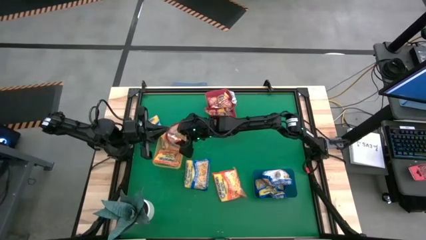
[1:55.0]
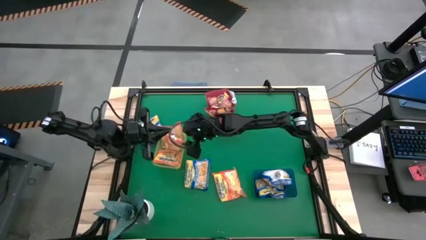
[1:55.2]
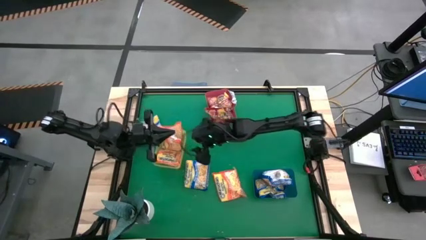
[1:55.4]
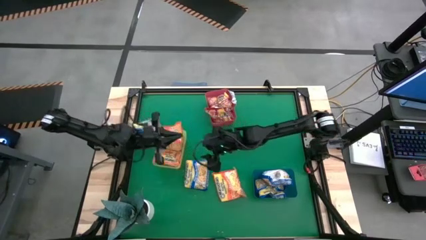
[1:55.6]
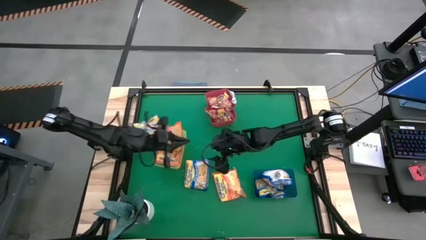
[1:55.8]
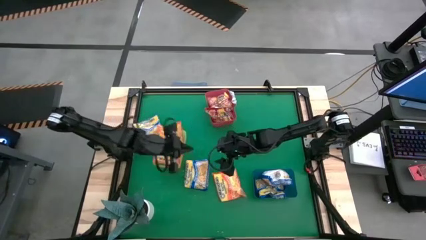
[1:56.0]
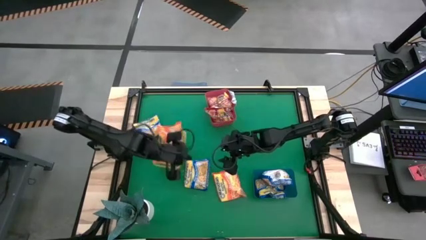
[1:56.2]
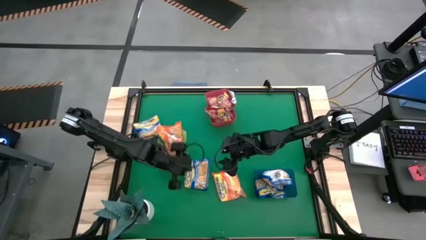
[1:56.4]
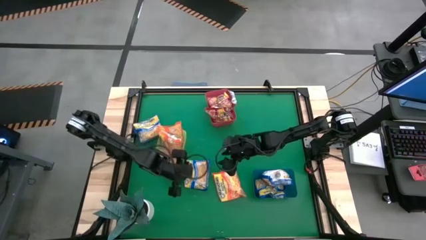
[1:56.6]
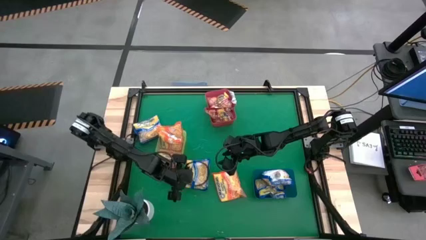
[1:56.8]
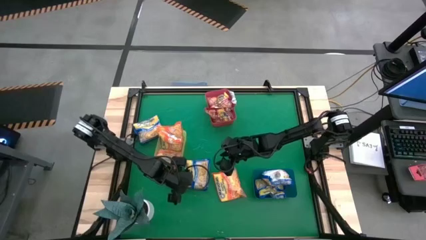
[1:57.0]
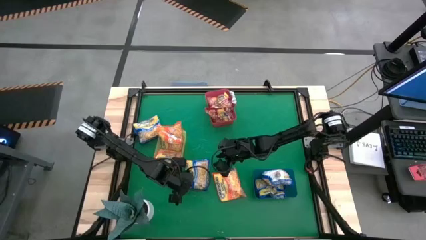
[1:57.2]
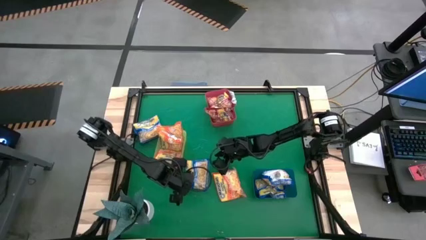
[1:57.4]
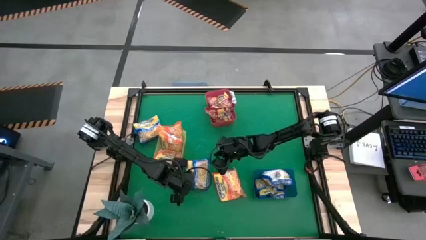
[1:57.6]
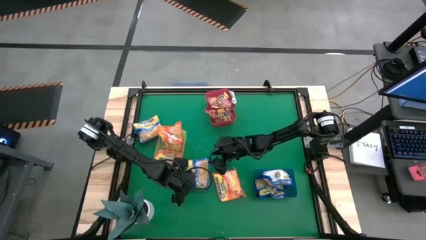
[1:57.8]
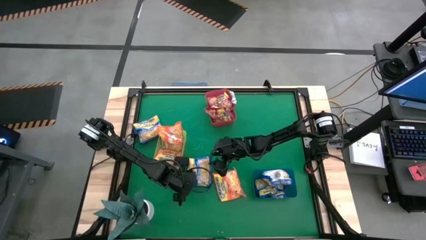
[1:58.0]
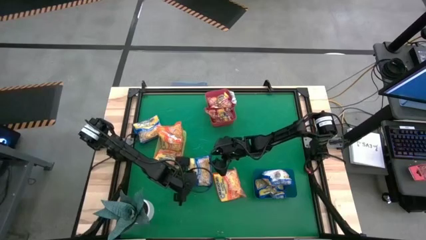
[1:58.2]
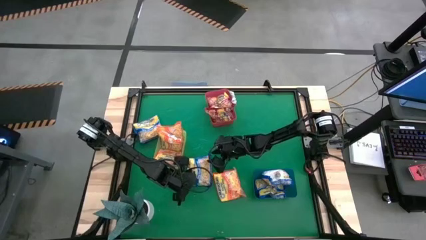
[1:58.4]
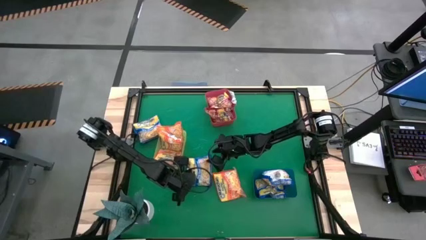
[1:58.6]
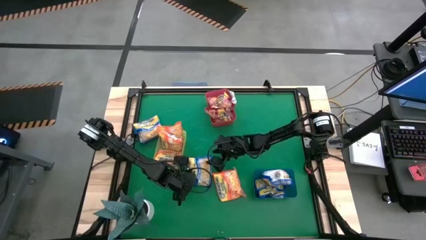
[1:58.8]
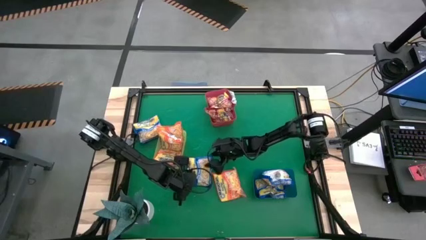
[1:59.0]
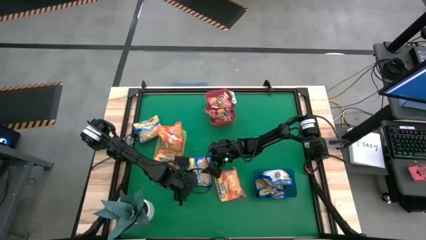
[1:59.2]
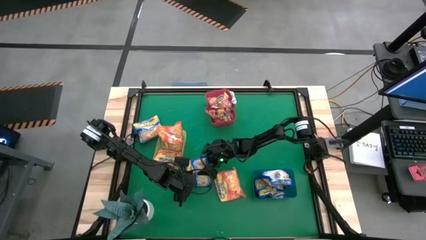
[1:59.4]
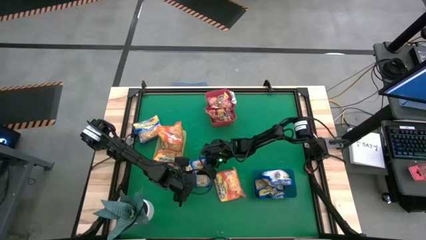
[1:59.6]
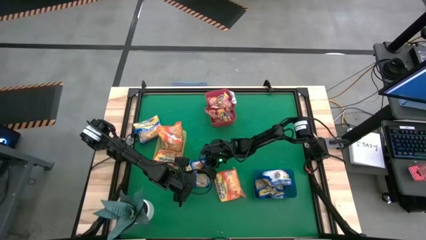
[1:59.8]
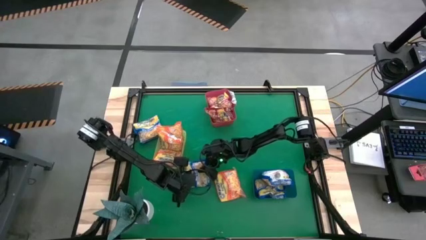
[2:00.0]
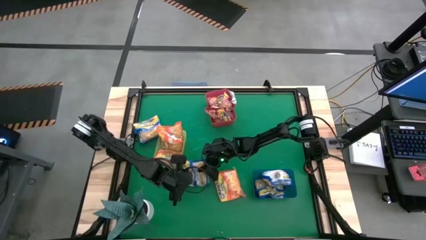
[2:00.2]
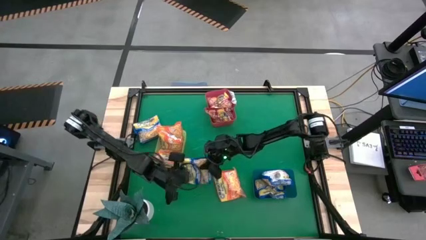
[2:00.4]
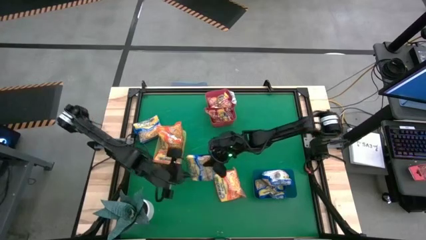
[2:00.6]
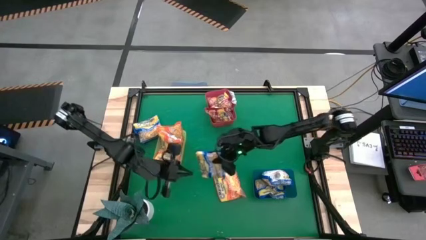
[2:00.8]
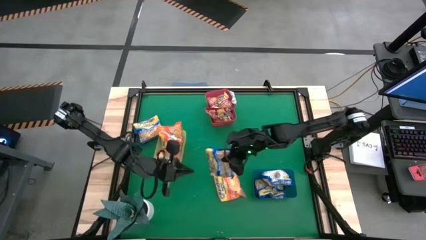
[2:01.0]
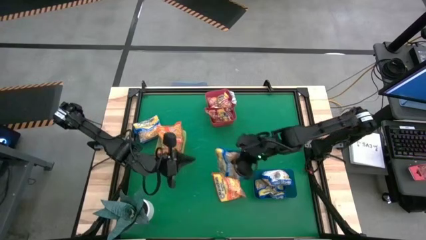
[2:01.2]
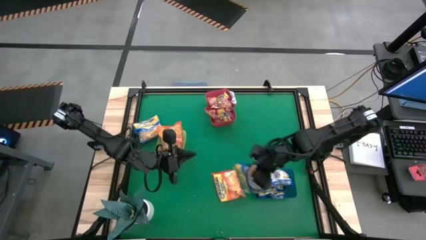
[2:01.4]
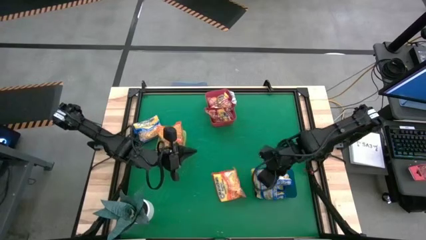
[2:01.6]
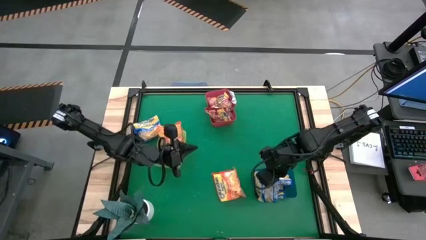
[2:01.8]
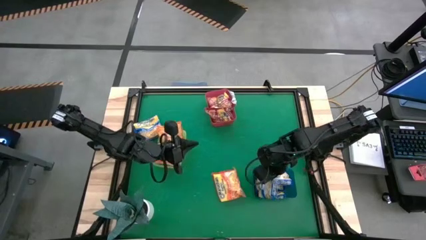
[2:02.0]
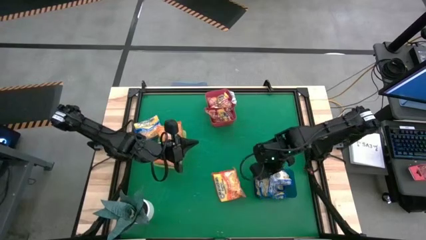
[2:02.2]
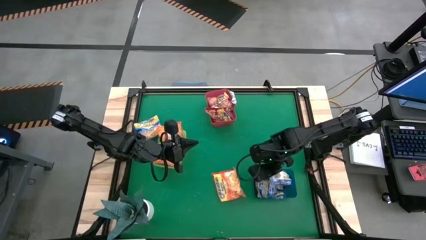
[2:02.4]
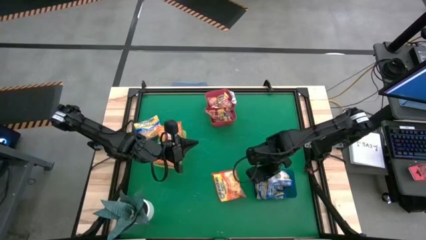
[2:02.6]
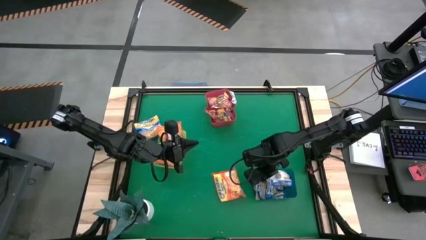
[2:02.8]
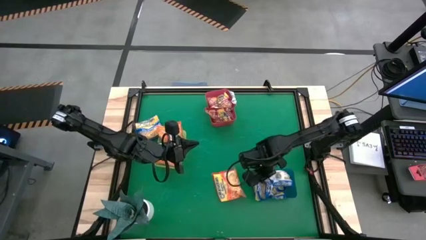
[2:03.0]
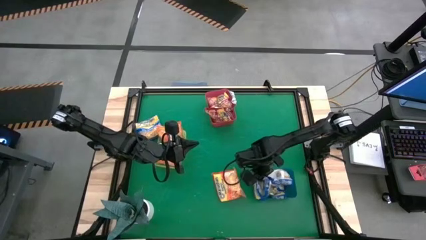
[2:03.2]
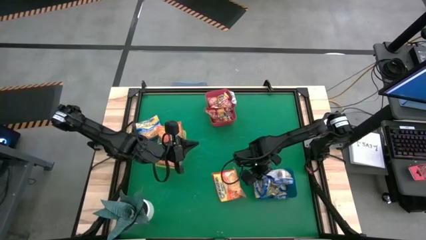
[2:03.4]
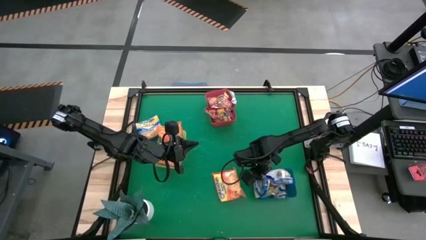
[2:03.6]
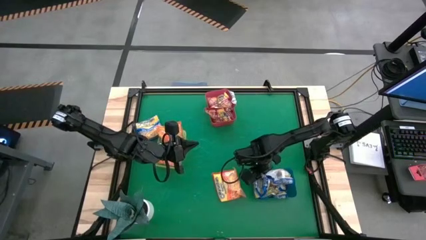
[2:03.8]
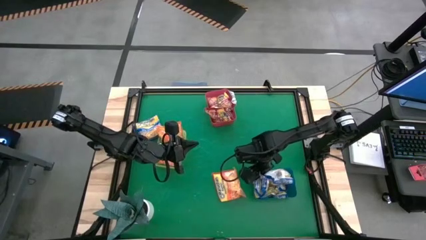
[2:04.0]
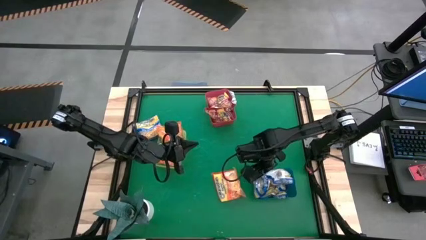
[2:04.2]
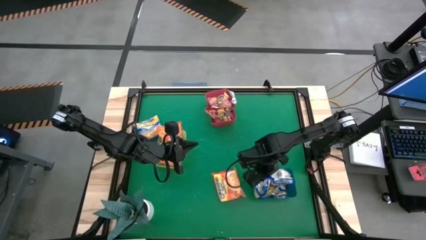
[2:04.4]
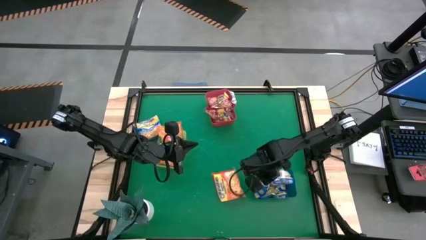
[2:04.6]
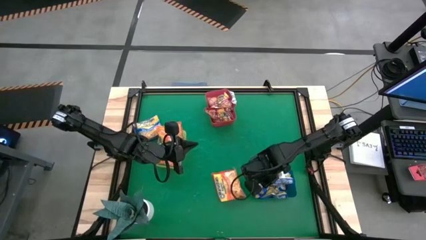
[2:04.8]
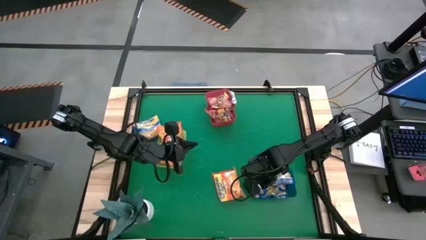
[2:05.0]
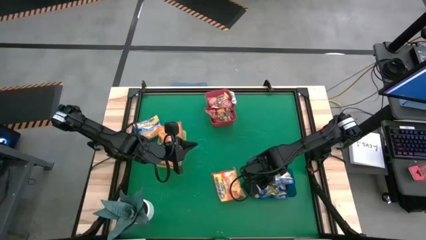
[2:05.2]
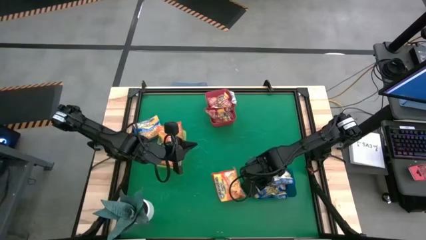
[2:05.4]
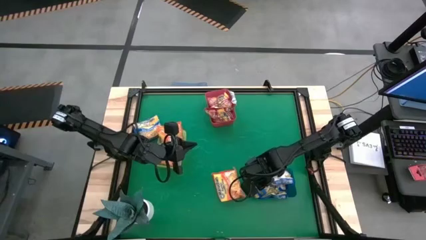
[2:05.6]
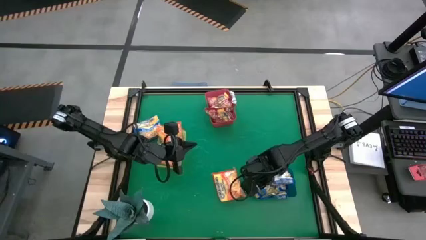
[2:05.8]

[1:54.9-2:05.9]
Task: Sort Maruchan noodles
Put the blue noodle pack into the blue bin

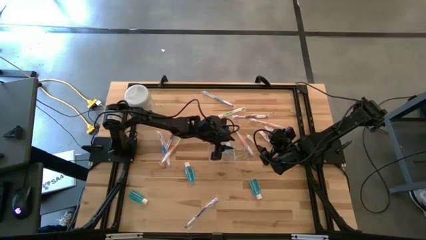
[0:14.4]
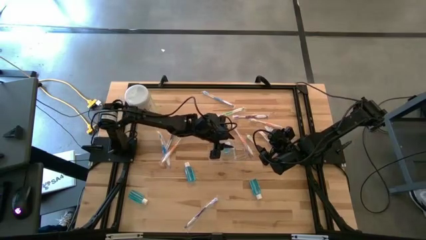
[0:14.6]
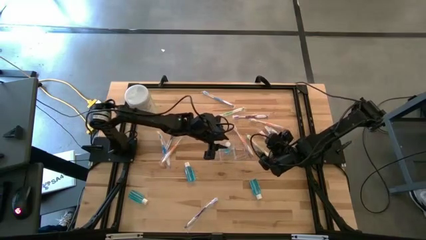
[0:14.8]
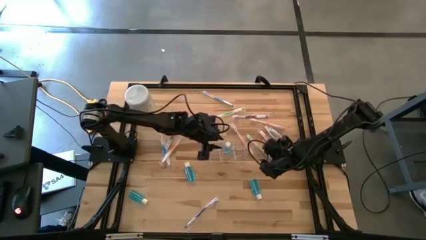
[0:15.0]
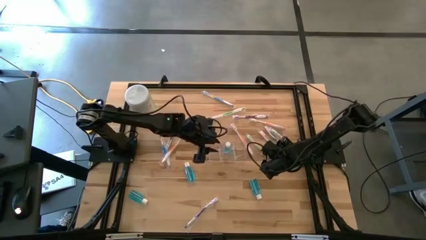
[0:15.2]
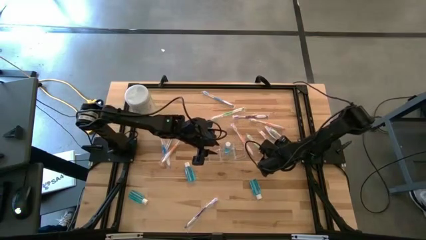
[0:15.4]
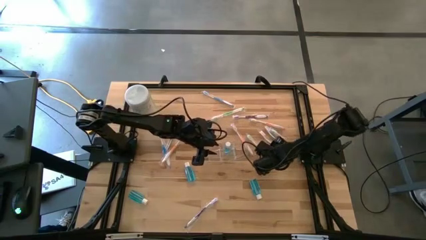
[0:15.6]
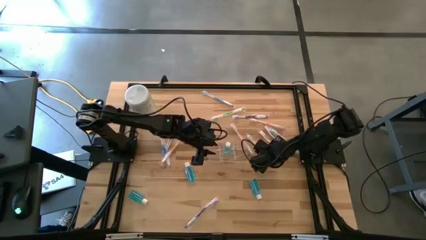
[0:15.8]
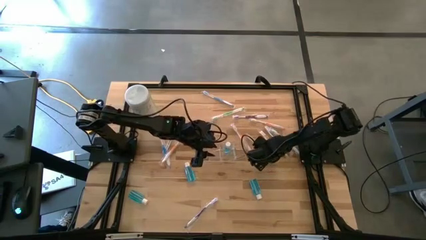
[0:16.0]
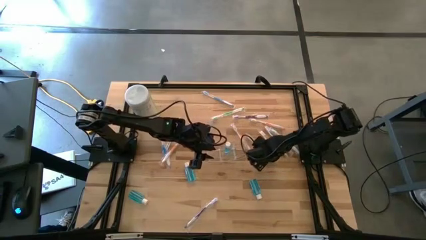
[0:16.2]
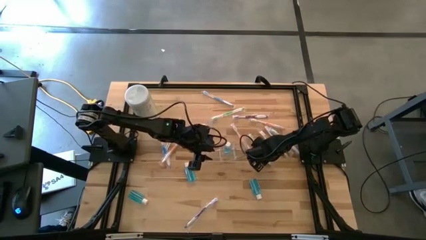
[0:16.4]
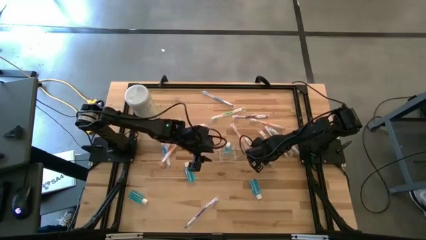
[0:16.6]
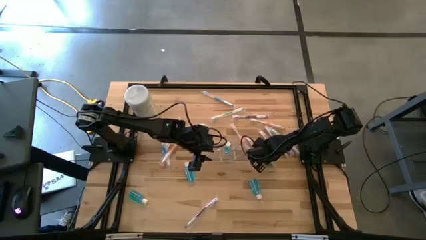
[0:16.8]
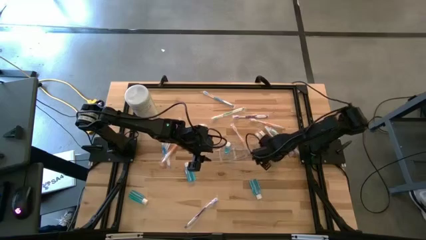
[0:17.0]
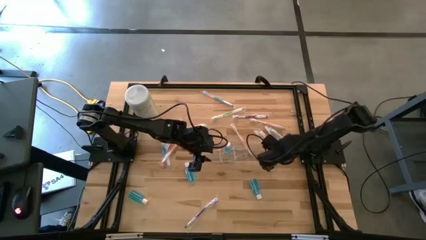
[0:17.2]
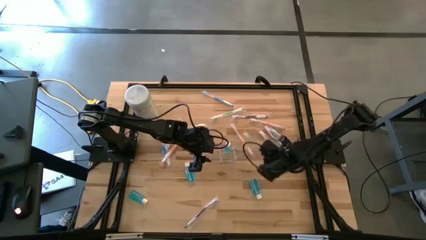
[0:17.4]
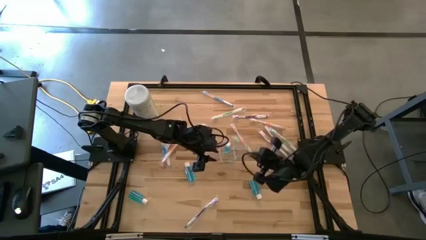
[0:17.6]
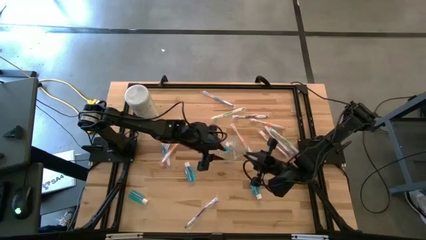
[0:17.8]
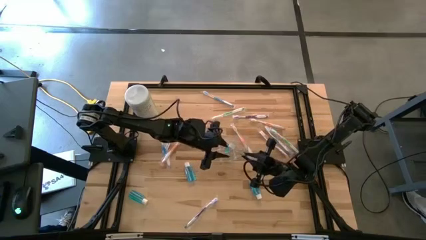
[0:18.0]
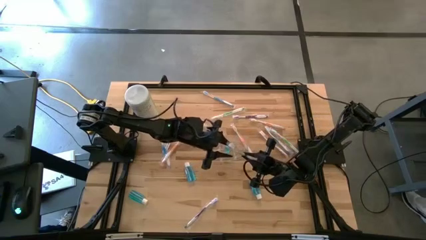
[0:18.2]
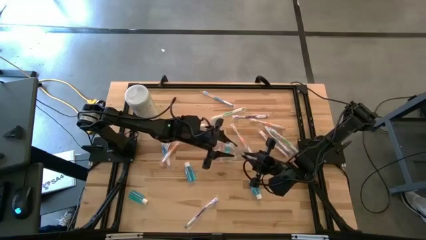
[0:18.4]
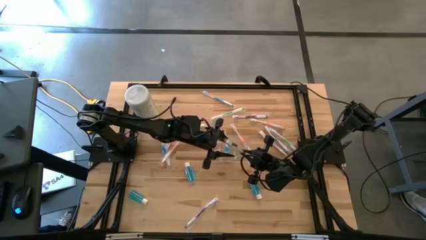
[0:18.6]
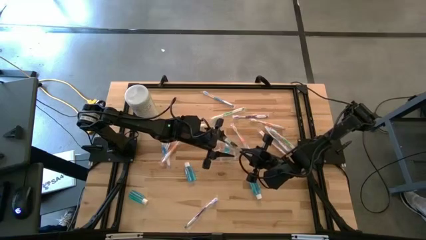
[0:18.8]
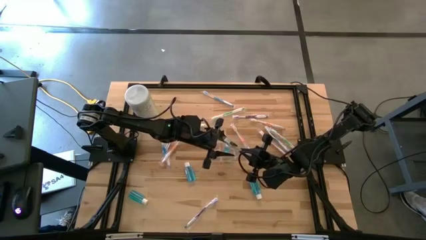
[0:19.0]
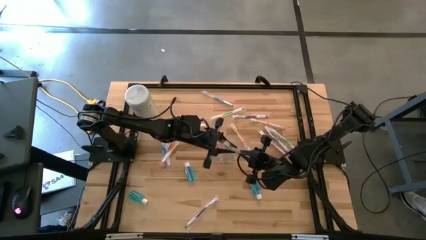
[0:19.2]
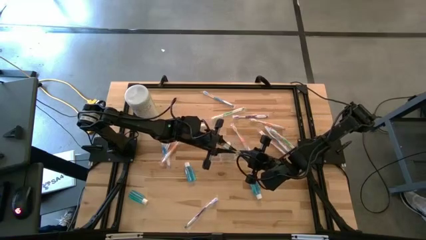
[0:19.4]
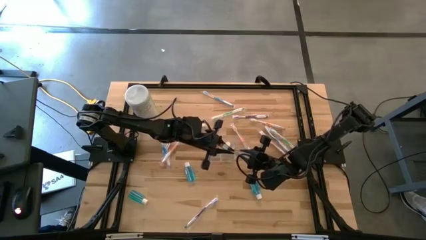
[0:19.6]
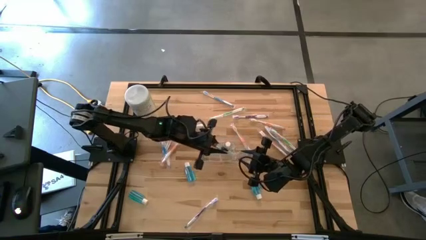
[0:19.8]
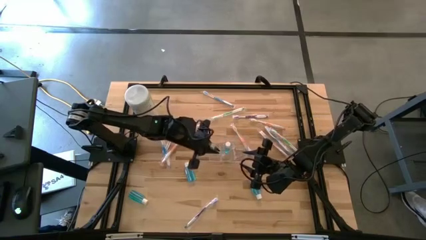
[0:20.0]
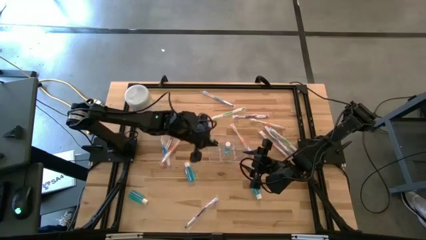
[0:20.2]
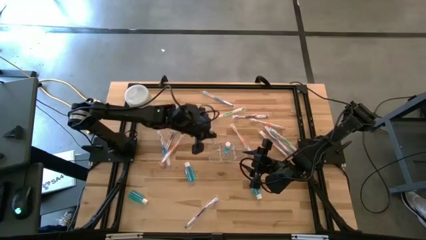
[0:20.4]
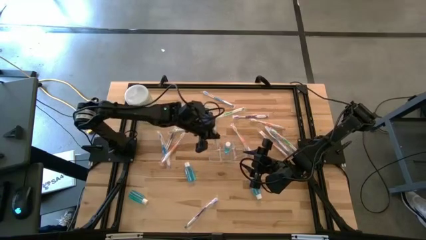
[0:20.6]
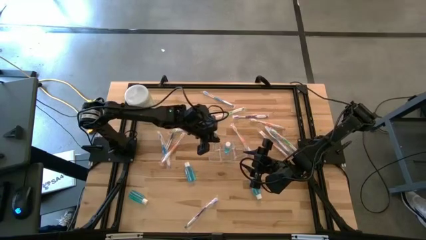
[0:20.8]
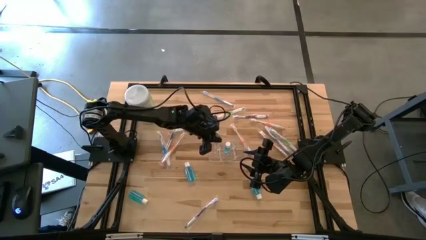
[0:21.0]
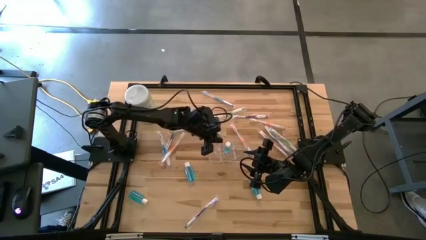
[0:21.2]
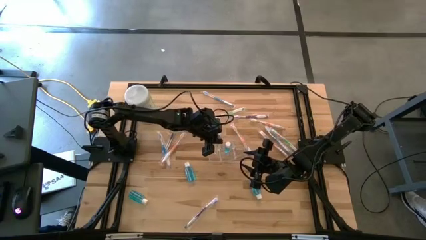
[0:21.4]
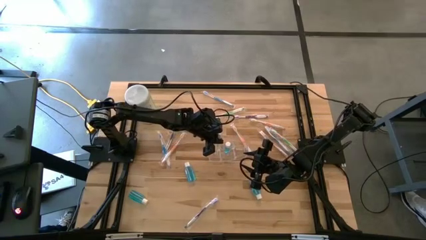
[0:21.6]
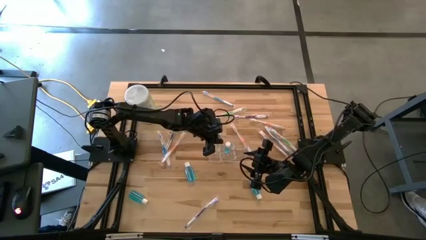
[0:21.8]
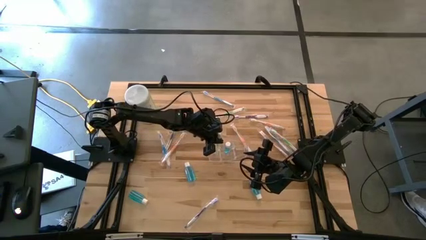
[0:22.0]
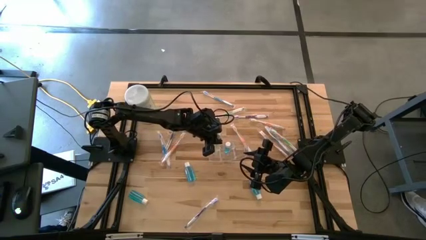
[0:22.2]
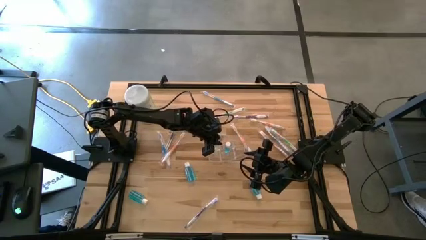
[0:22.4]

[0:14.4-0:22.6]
Task: Pick & Place toothbrushing station
Put the green toothbrush into the transparent organizer
